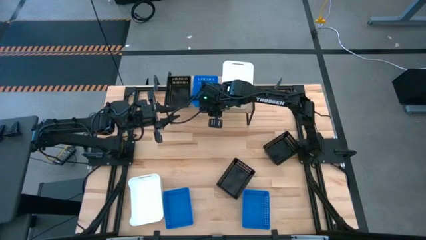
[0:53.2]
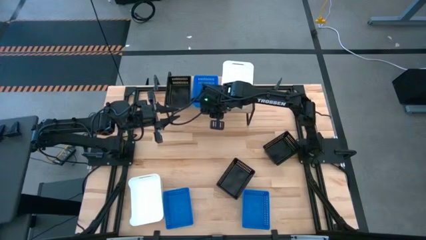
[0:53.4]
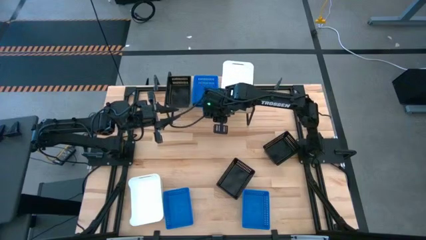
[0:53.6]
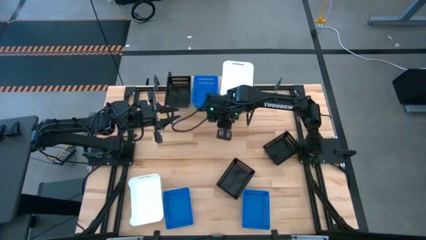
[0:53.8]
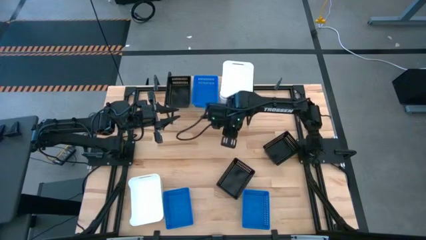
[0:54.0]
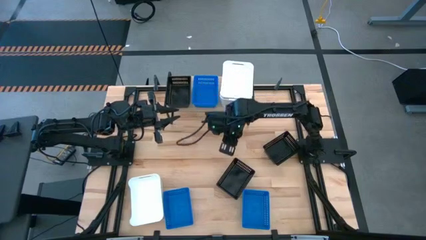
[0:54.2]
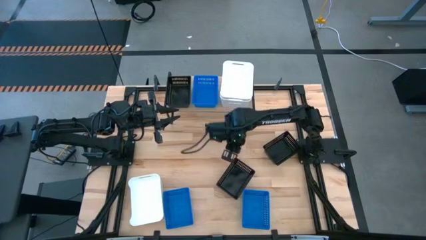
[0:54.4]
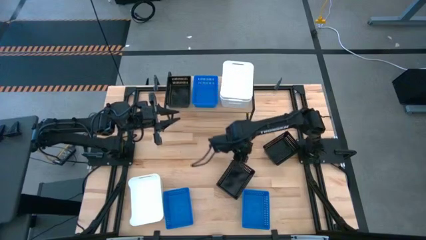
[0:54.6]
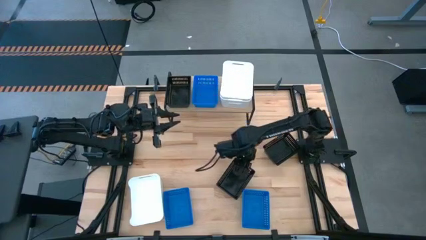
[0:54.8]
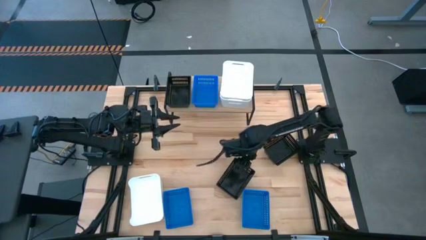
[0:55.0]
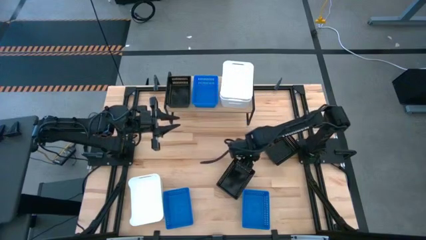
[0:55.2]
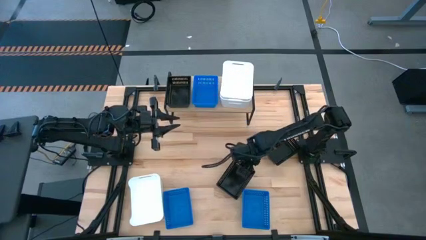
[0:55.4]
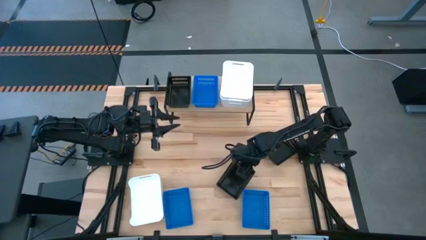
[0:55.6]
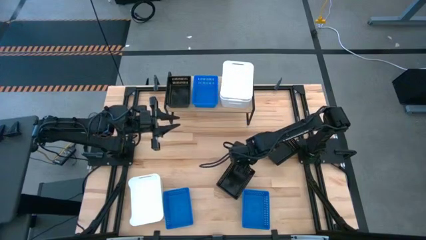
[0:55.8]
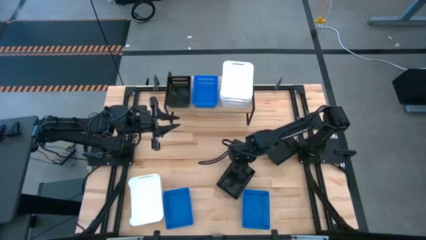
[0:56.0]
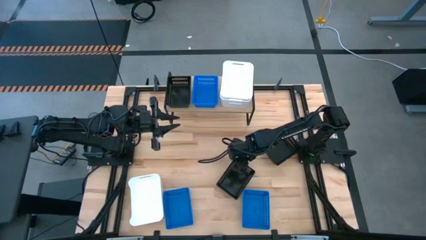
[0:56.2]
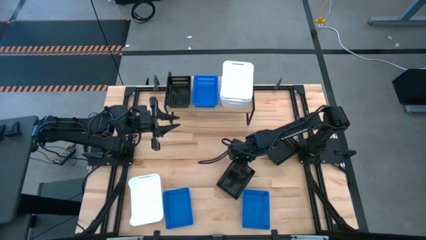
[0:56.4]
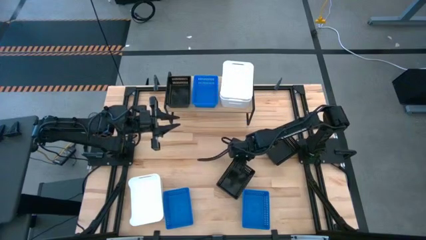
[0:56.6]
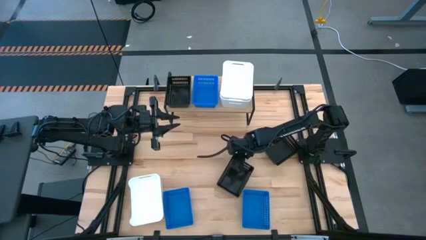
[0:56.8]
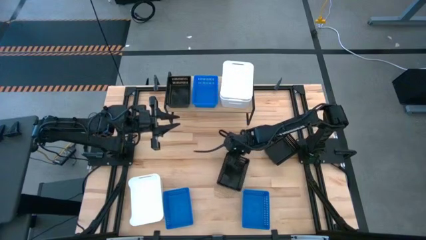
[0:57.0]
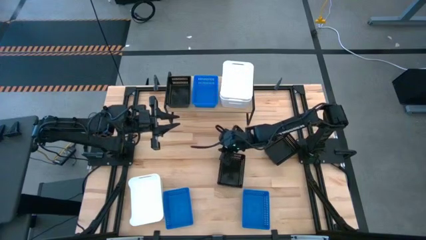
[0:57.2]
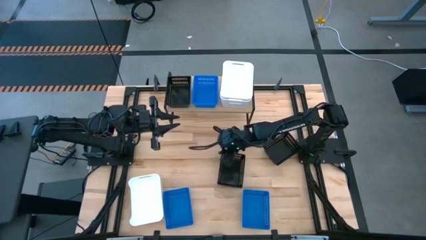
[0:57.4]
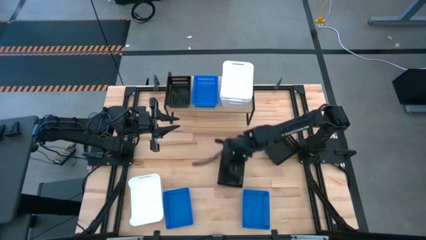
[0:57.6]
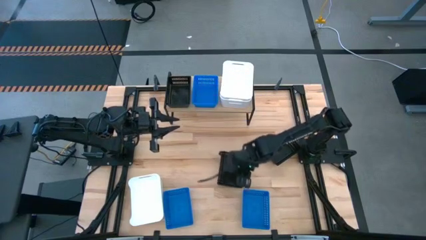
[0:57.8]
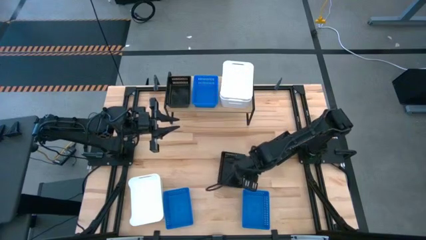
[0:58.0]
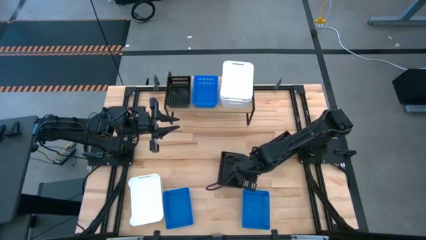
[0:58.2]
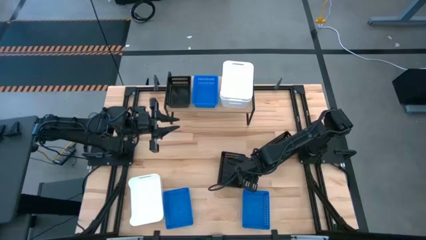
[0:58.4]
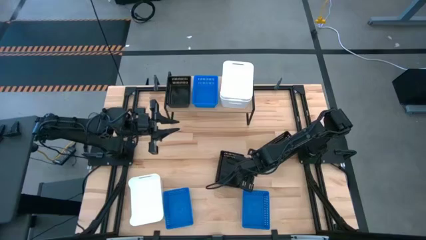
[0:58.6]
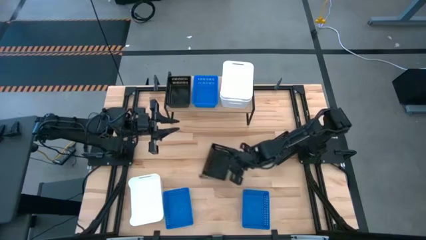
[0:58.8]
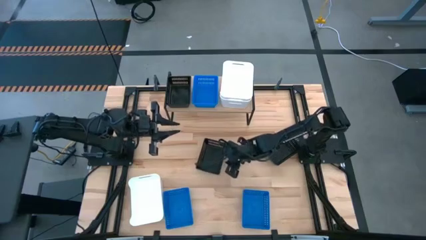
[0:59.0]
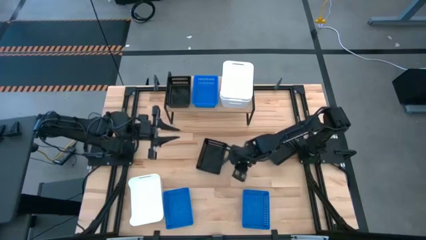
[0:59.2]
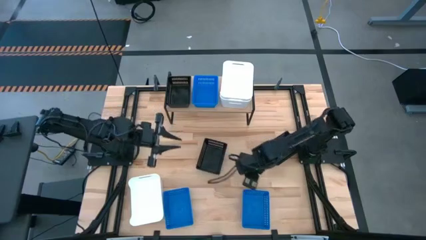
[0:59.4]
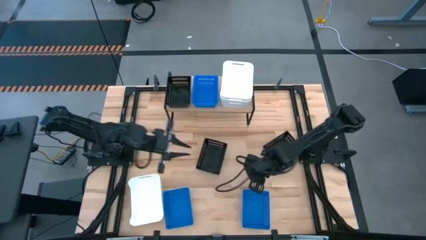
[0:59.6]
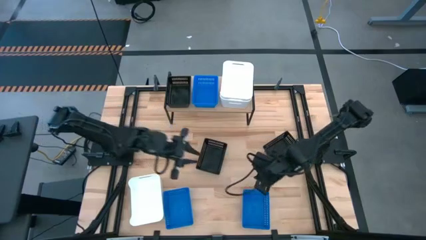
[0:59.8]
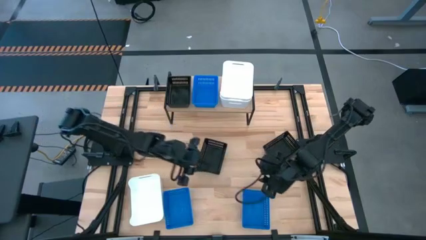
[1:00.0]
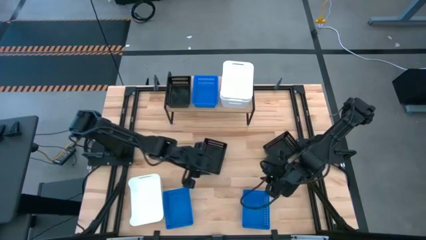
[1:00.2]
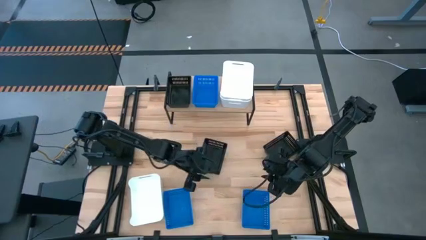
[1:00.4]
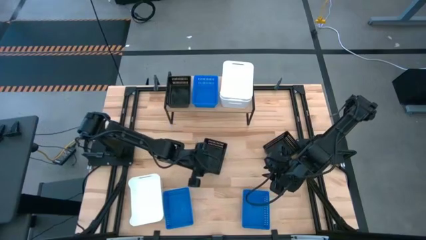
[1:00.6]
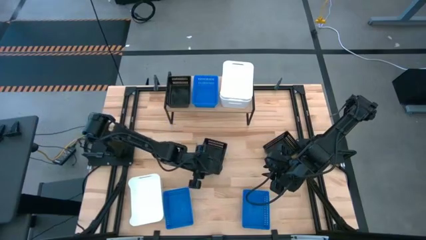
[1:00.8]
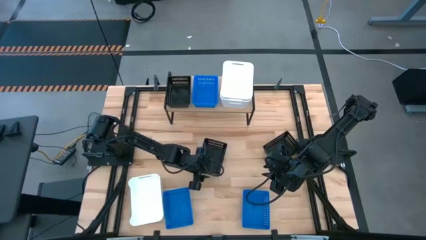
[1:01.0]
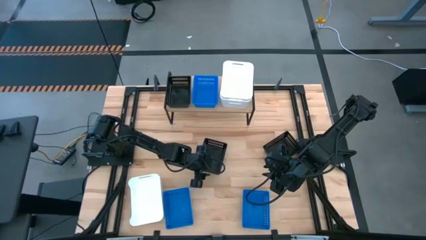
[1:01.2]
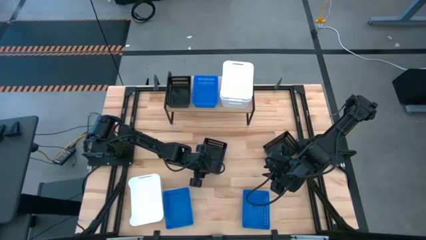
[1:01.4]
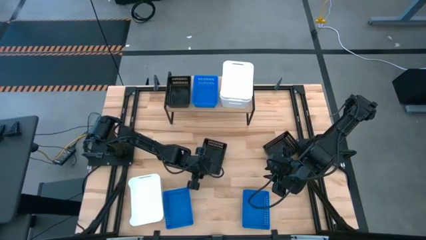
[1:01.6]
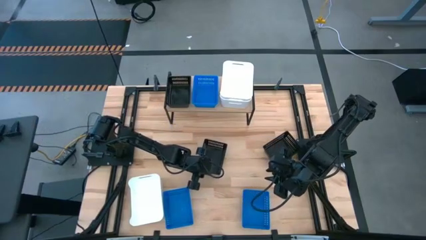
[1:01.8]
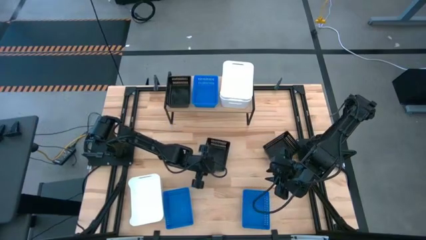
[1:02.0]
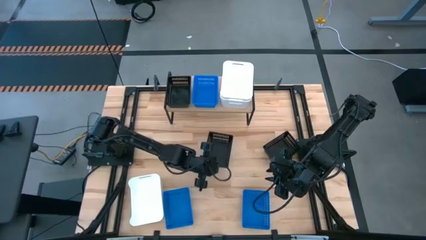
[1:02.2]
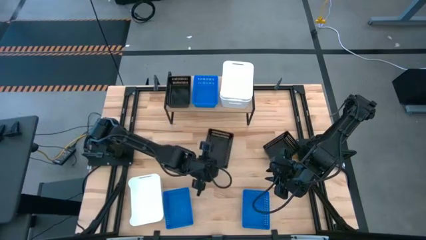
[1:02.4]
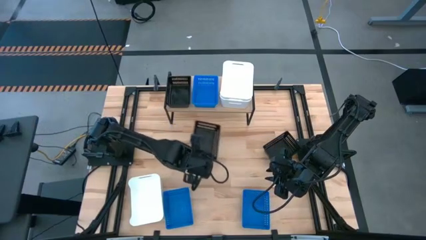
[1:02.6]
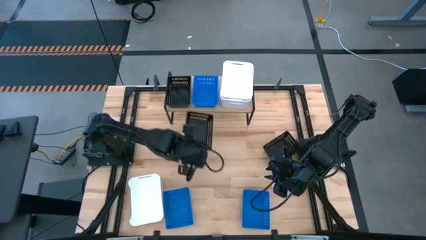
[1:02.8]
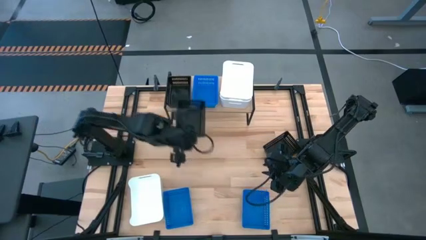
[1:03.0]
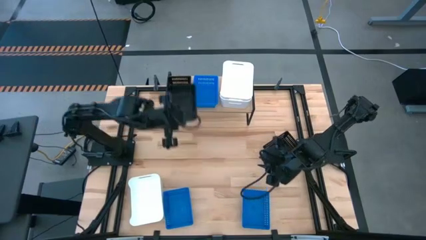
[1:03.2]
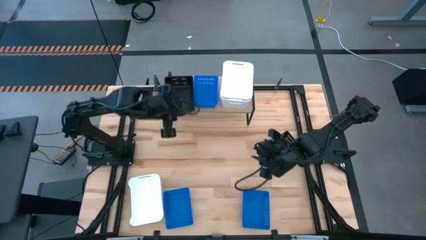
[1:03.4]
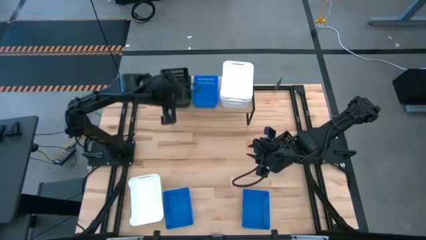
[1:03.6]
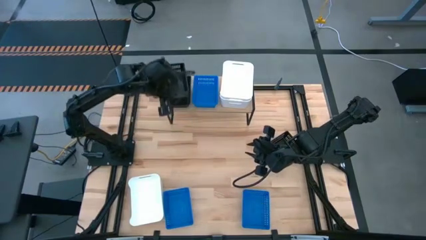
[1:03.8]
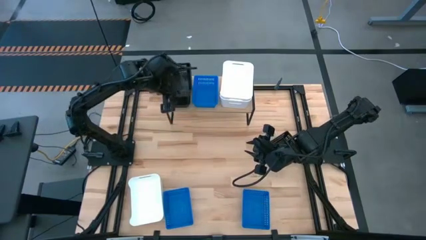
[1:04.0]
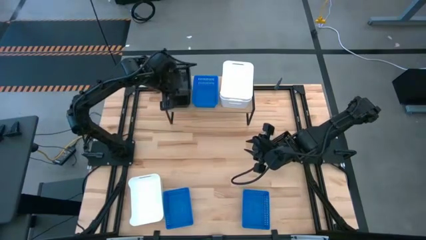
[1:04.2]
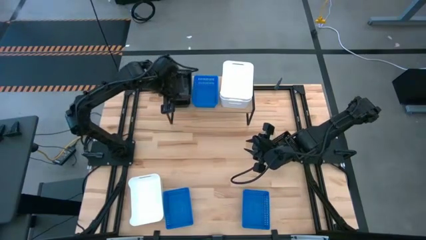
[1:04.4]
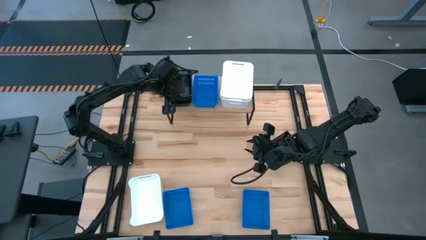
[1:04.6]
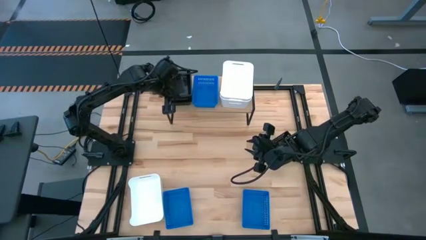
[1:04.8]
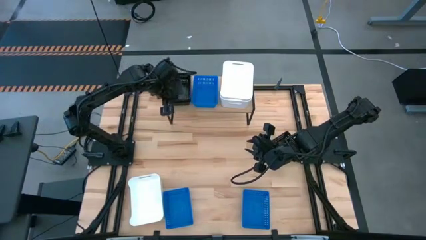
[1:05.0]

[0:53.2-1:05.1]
Task: Stack baskets on shelf by color
Stack the bottom black bin on top of the other black bin on the shelf

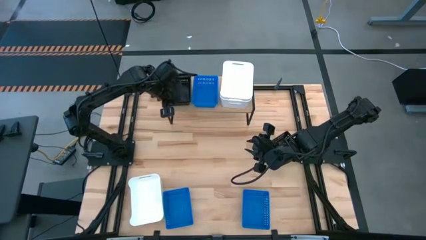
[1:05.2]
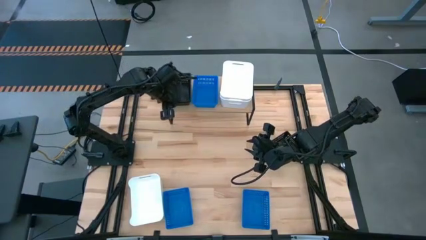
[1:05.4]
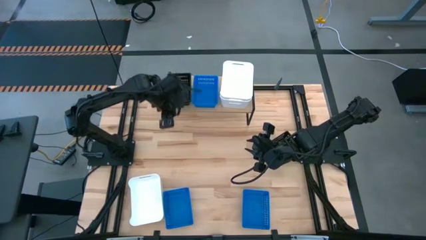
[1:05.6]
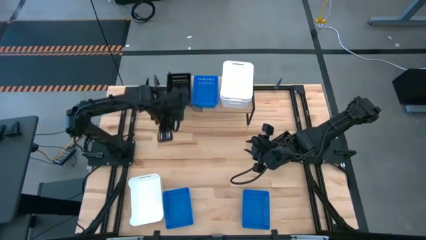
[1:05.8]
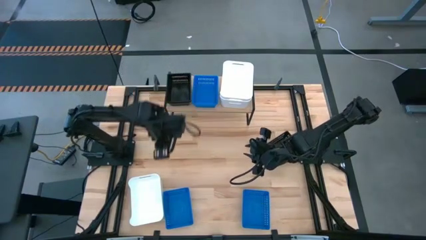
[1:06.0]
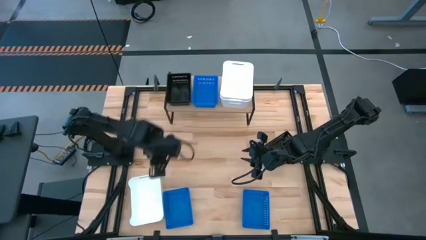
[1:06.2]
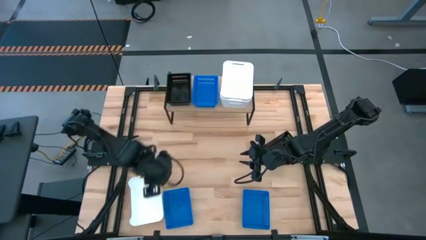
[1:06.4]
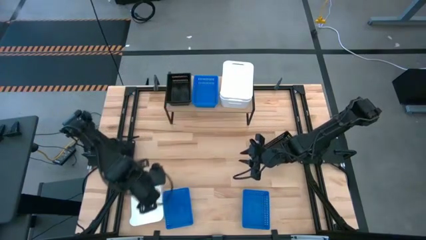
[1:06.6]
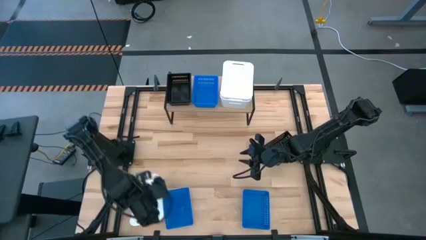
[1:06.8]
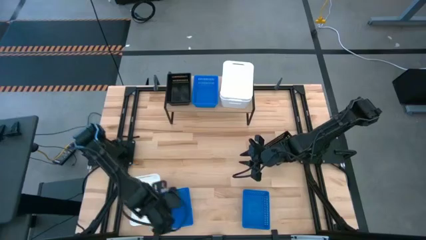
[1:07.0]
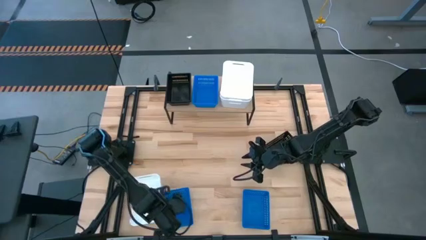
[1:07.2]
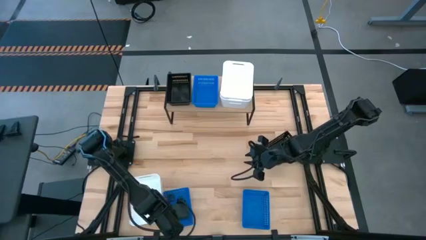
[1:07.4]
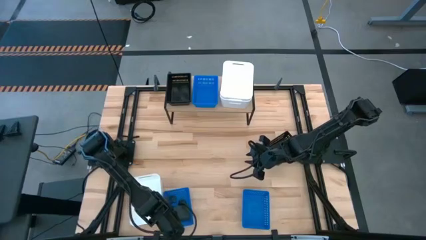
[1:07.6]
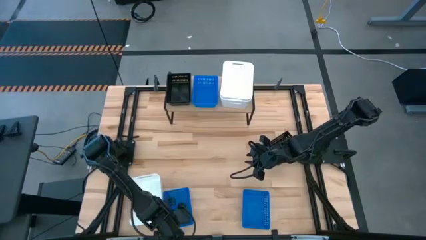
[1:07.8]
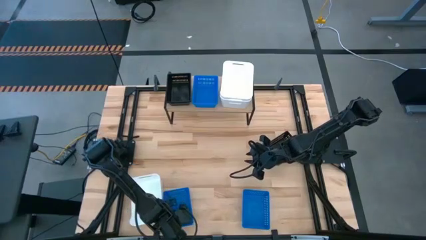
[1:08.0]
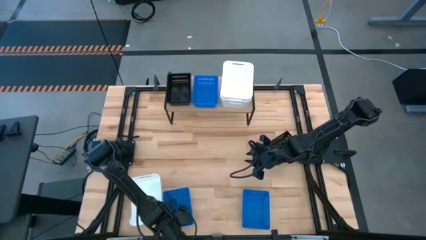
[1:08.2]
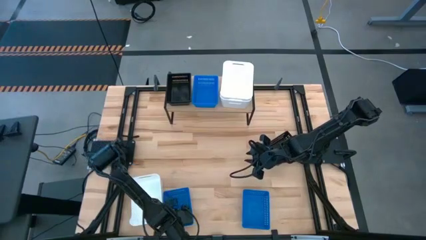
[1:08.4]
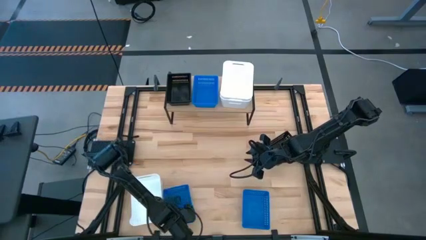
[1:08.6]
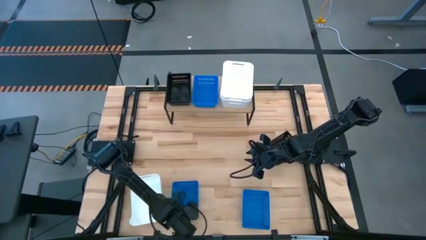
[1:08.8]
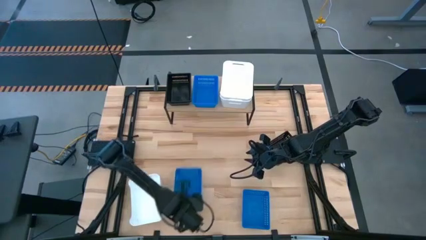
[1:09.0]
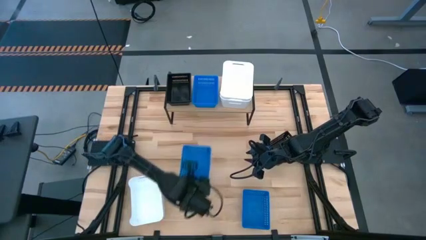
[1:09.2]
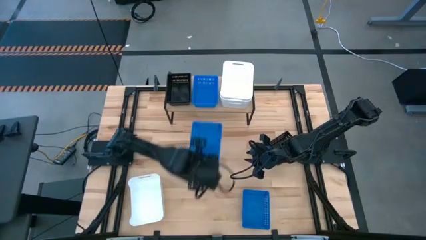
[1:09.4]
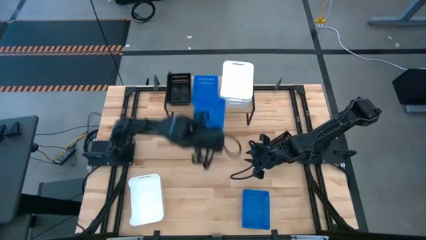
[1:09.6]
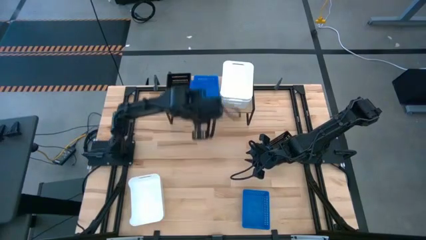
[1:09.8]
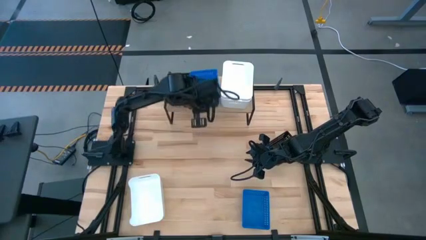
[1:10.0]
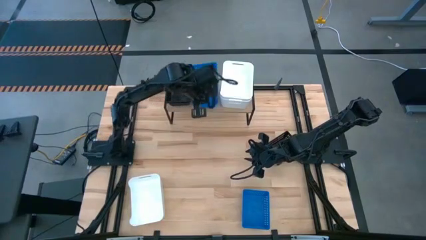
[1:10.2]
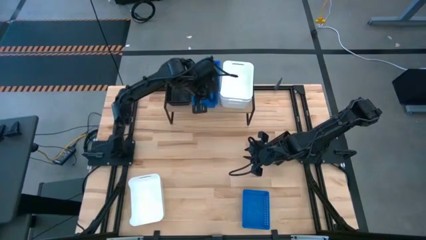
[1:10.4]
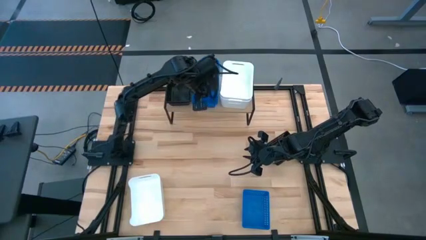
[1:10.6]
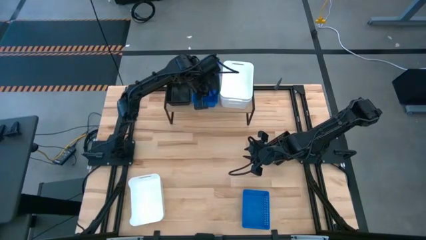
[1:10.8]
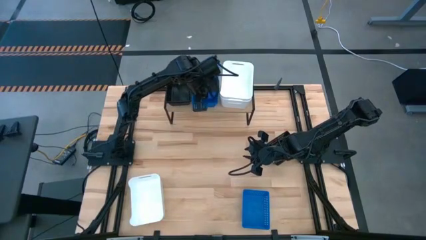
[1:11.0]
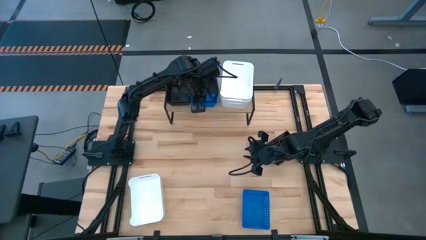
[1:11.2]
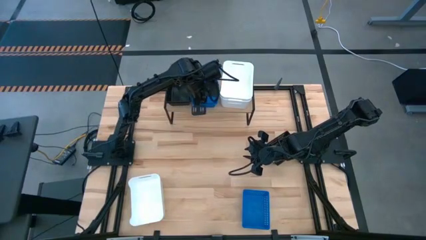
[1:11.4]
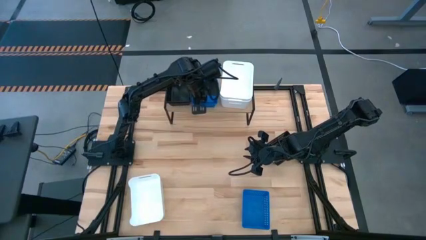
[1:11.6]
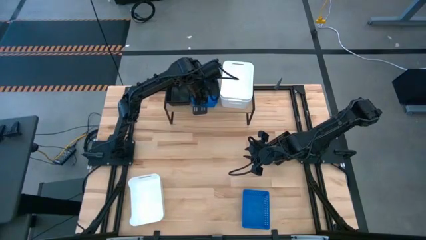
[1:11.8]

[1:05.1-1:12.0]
Stack the left blue bin on top of the other blue bin on the shelf
